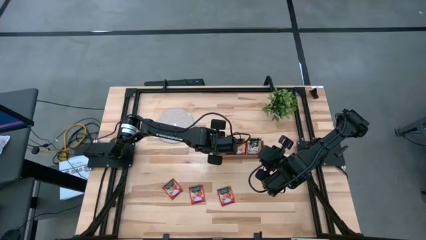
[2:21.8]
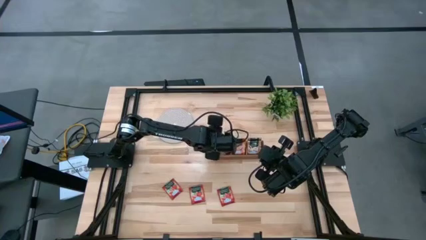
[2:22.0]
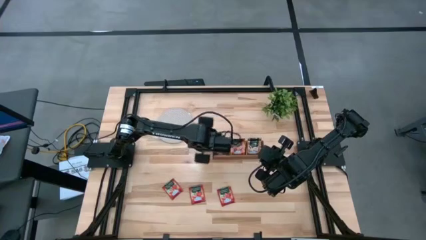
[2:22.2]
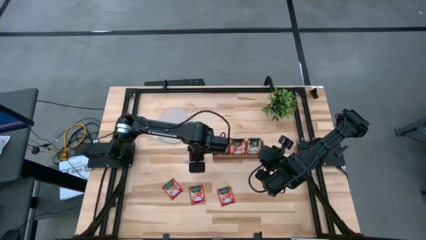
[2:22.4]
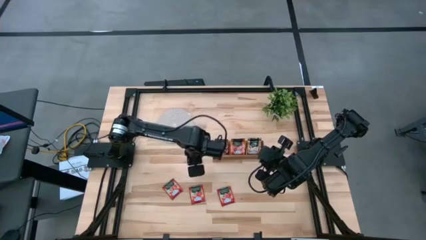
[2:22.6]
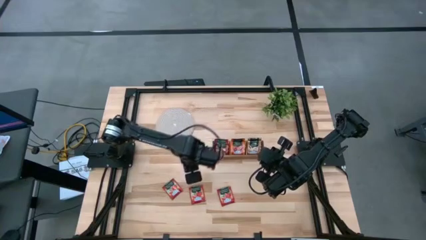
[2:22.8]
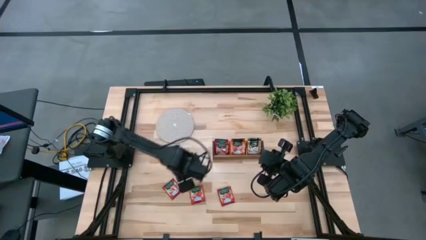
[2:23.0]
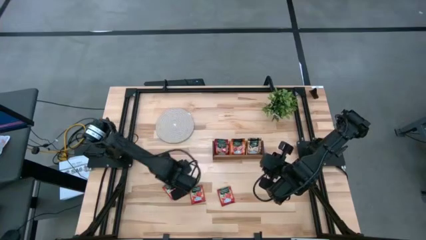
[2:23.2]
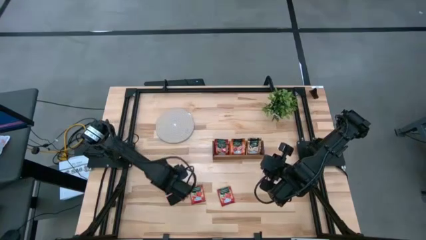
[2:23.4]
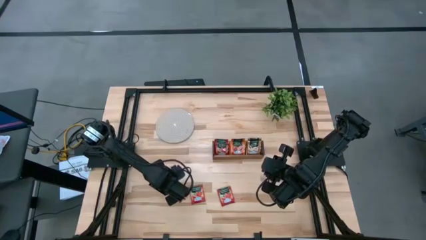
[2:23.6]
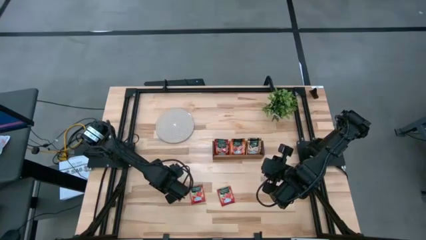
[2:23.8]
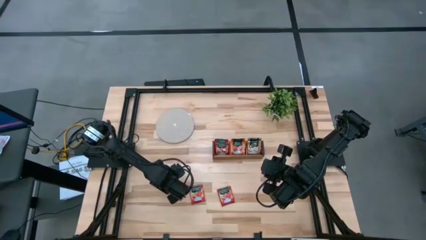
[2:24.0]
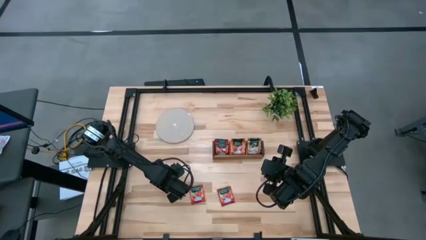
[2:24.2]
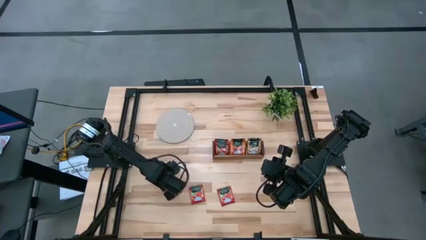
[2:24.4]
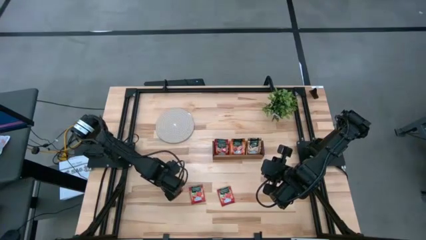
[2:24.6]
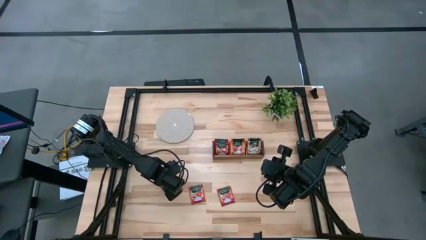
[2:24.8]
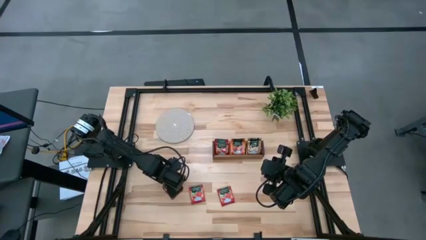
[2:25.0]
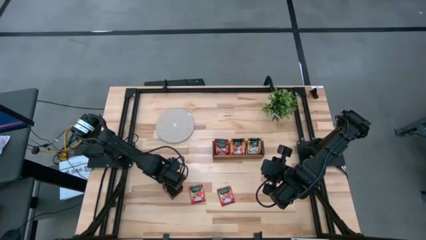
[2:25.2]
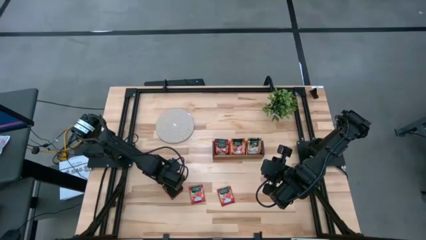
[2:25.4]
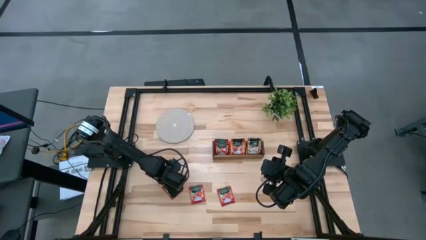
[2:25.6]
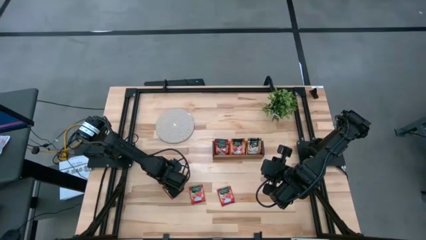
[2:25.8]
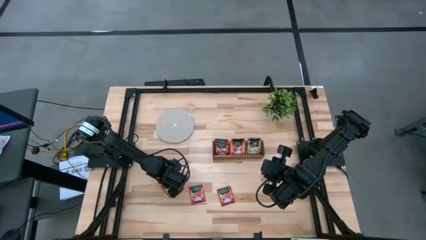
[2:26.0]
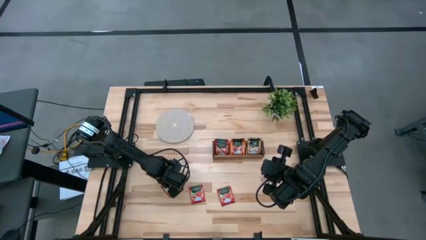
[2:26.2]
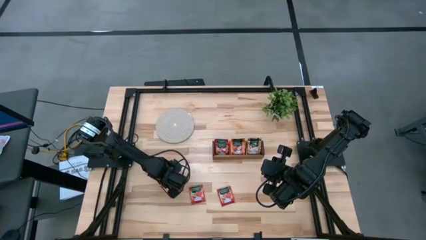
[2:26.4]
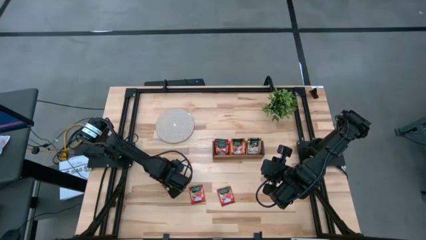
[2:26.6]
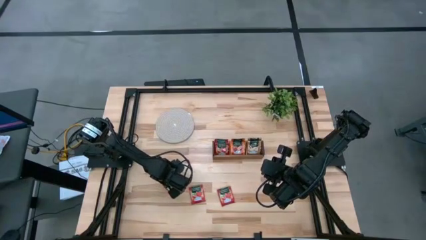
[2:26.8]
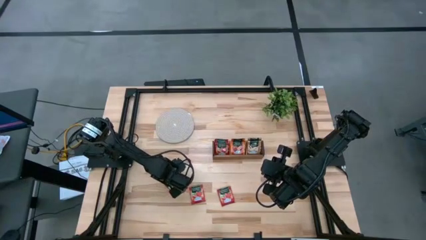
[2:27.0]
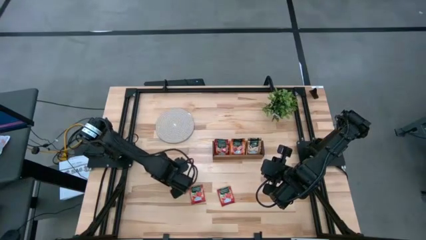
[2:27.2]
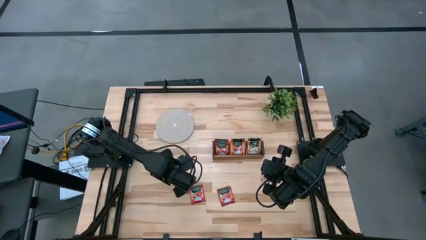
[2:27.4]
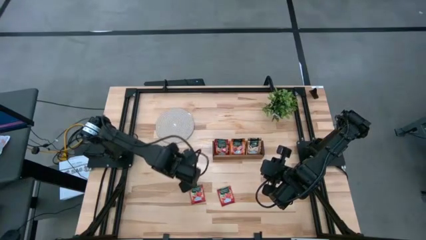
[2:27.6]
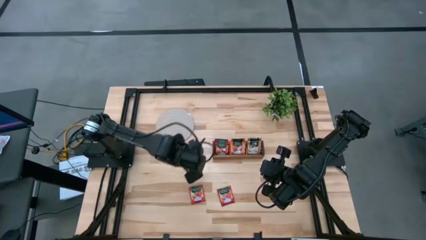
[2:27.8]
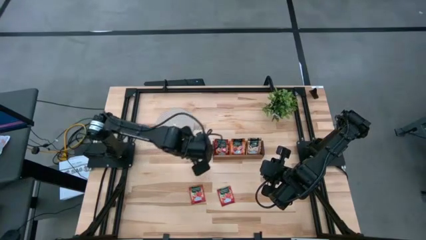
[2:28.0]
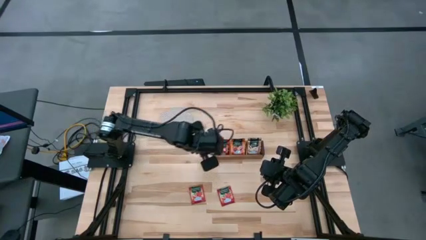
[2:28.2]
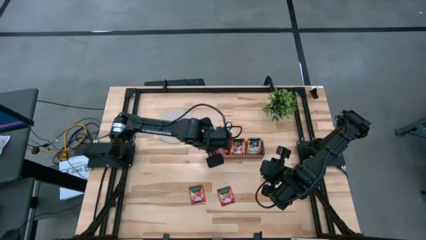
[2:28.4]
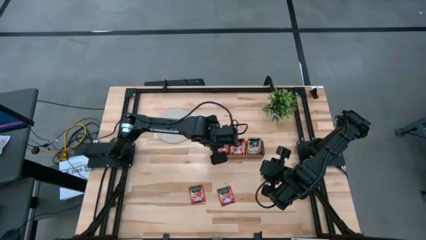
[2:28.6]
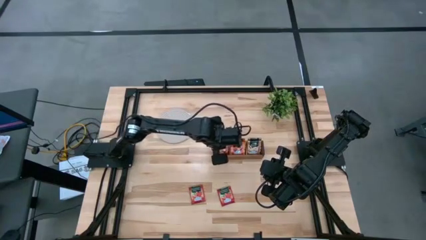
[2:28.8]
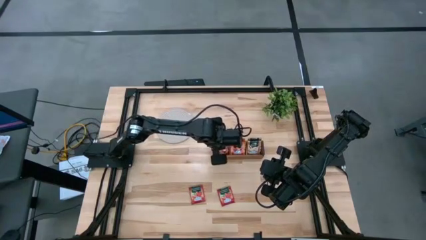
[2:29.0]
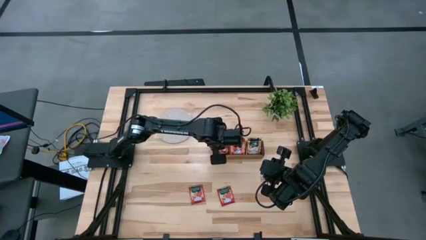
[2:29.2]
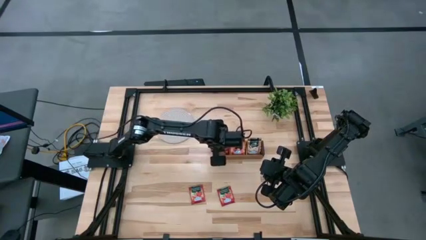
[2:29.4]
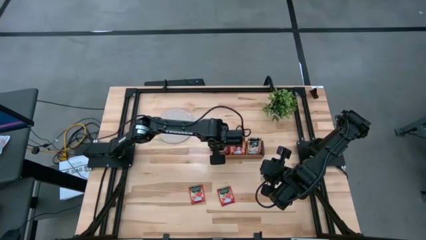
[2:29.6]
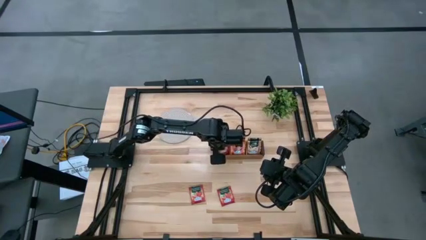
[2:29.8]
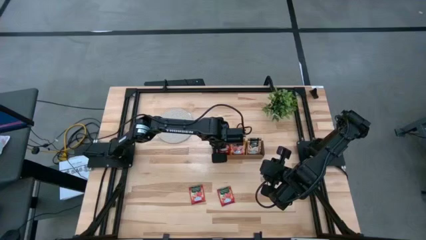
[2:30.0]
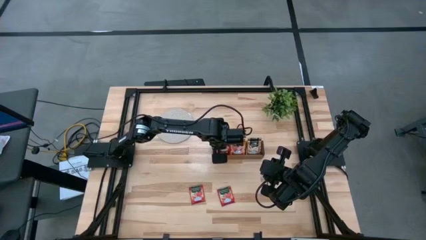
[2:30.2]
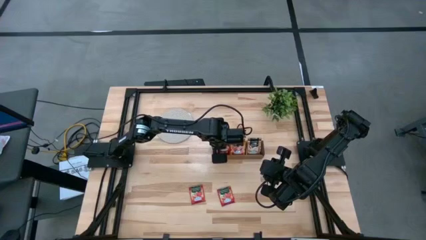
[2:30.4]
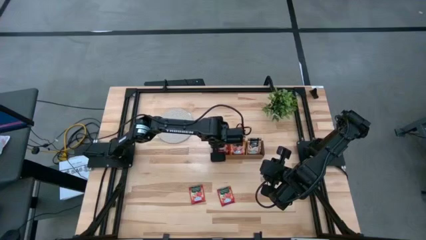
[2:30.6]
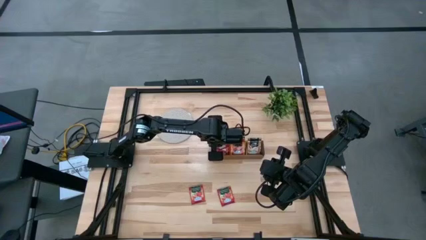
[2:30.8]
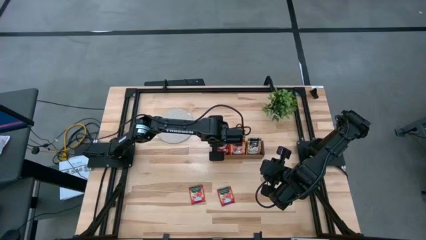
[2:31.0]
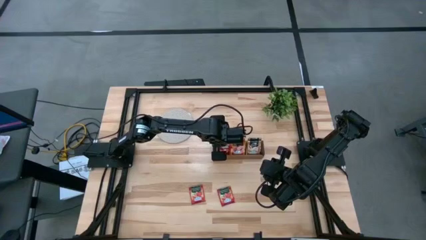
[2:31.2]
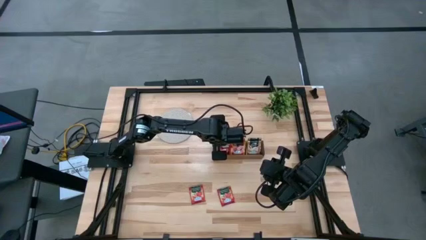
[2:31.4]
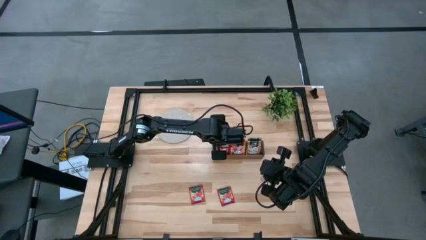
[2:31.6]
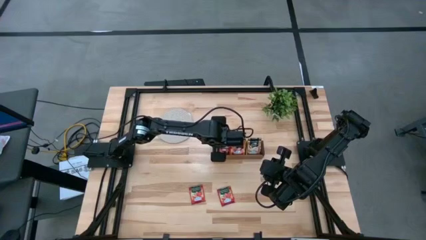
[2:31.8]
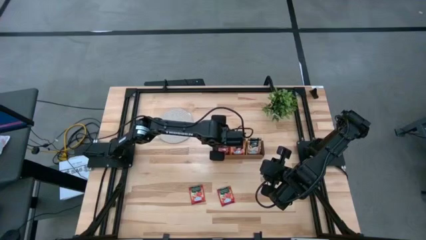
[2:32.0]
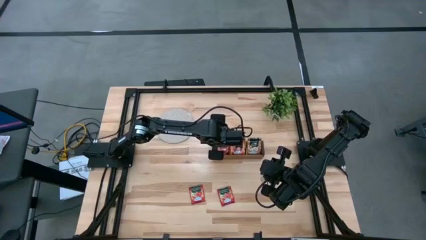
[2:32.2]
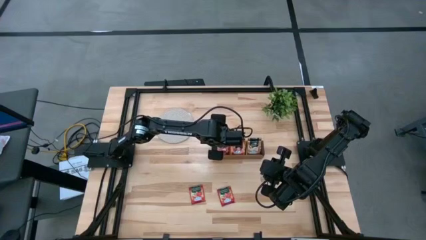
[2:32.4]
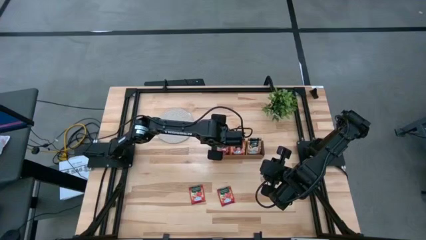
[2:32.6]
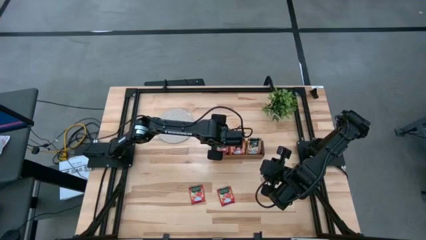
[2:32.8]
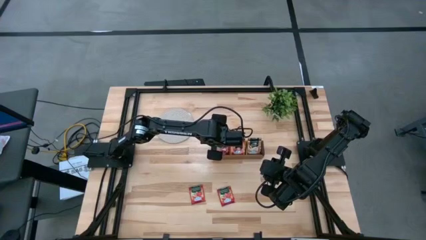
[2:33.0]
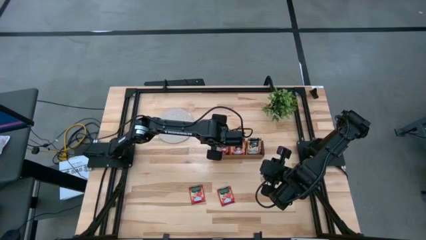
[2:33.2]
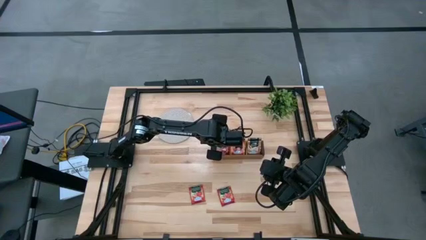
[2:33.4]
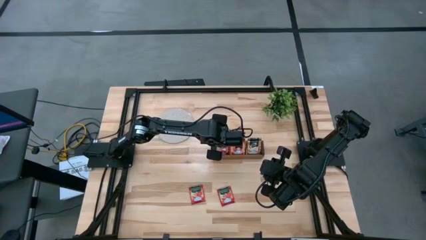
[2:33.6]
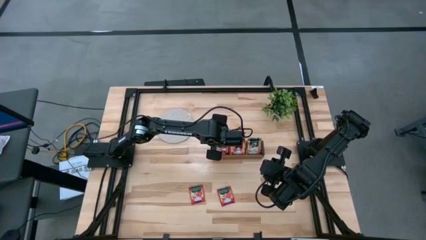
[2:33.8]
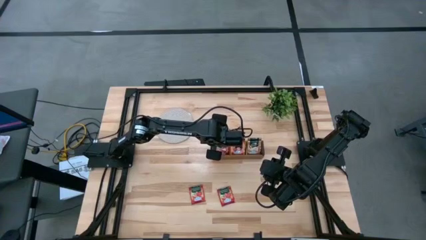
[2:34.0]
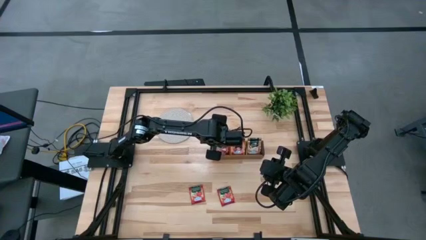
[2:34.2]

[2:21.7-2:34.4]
Task: Pick & Place Tea
Put the red tea bag into the left section of the wooden organizer

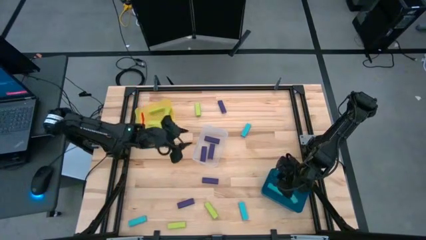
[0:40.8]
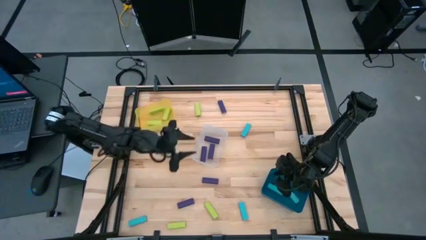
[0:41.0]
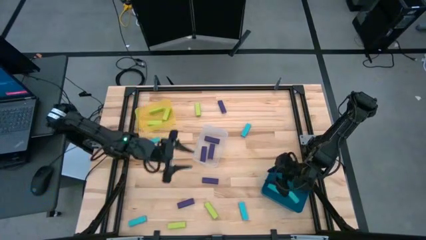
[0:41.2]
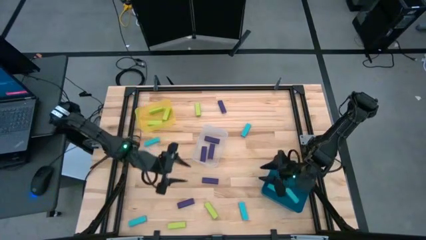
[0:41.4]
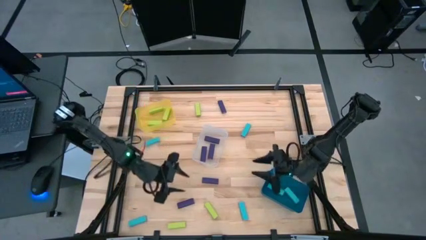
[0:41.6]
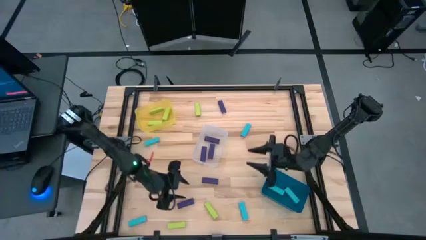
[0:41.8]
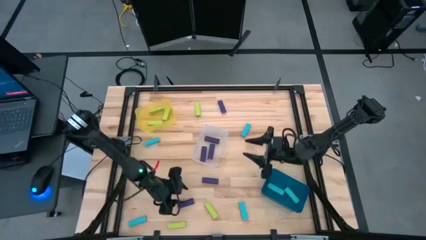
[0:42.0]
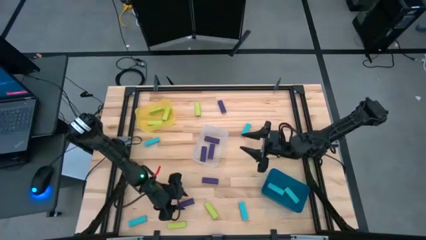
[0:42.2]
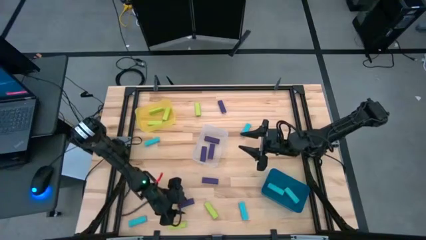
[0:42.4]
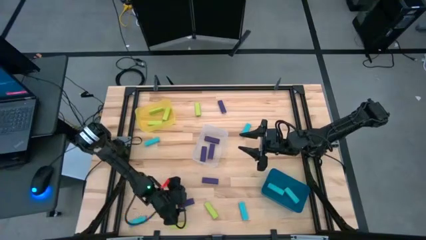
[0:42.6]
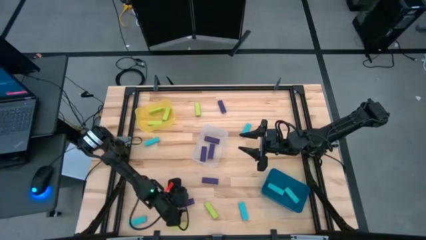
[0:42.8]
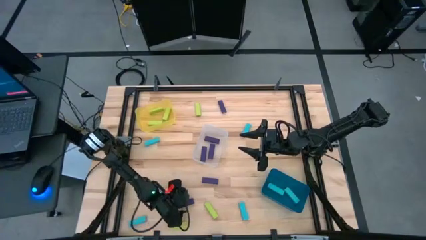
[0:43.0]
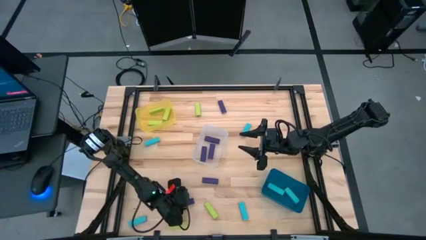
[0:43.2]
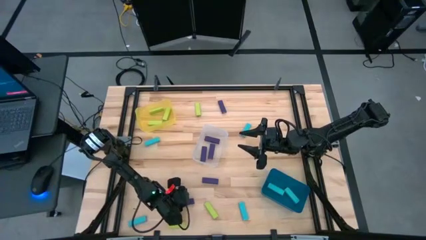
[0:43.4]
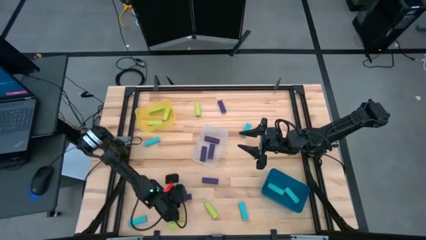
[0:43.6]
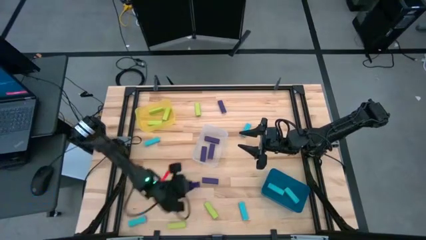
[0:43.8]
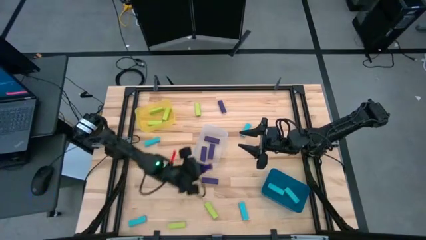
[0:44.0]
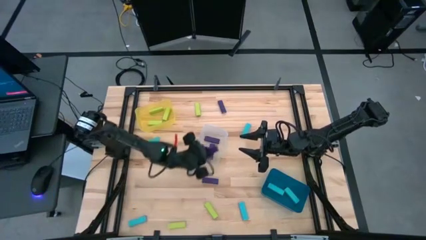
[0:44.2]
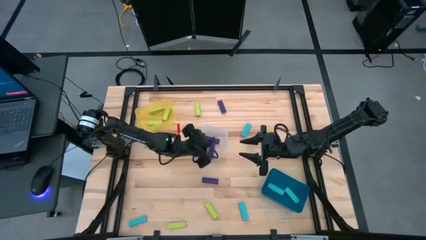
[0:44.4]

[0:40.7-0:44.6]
Task: Sort blocks
Put the bottom violet block into the transparent bin
